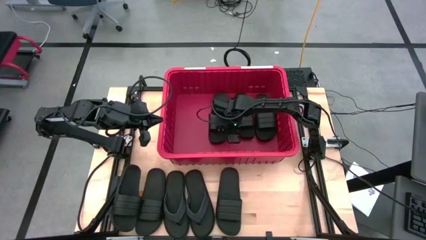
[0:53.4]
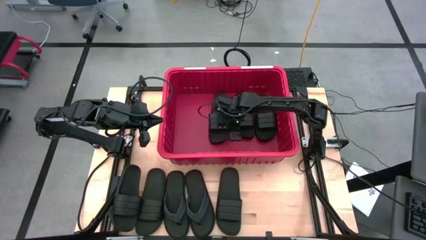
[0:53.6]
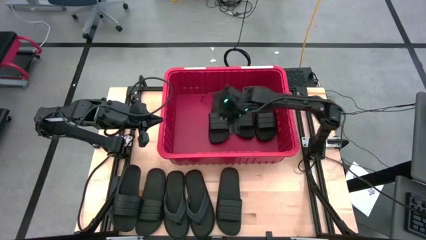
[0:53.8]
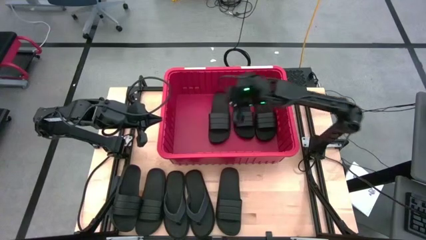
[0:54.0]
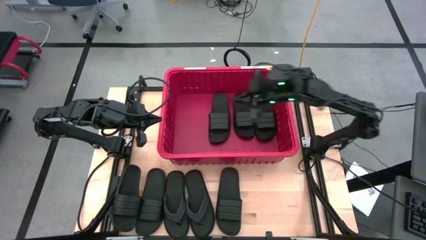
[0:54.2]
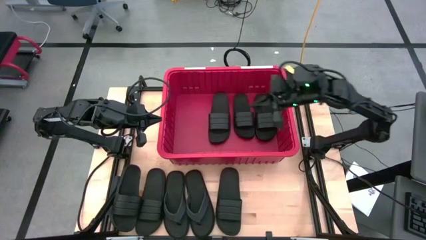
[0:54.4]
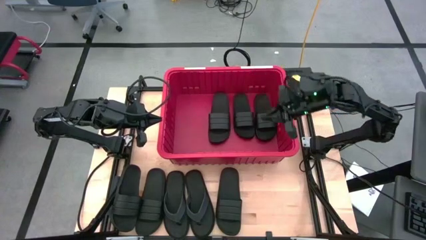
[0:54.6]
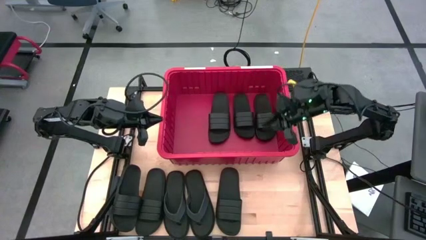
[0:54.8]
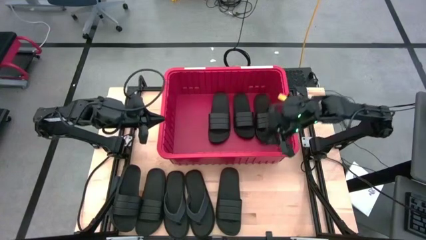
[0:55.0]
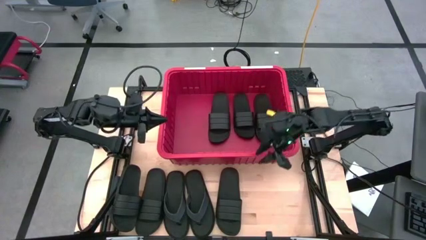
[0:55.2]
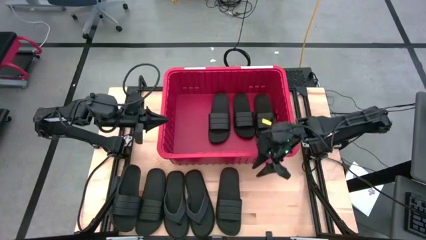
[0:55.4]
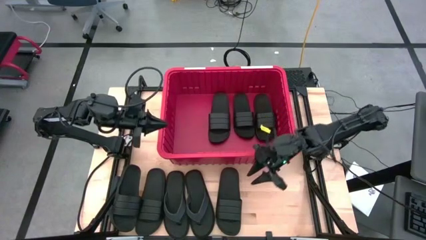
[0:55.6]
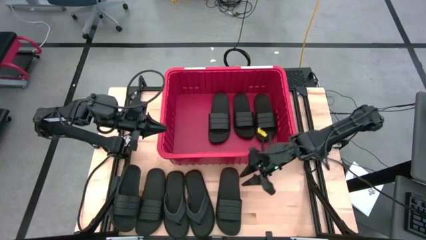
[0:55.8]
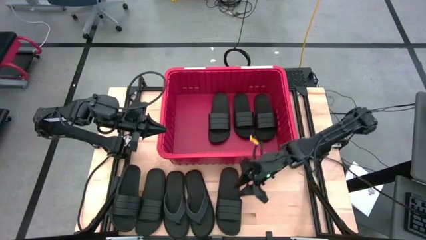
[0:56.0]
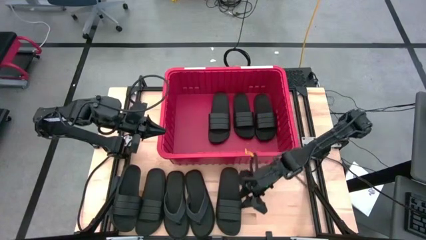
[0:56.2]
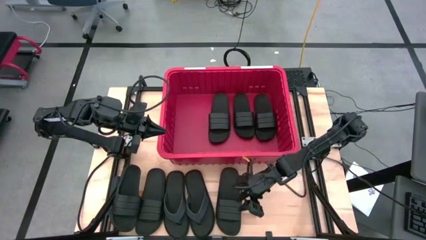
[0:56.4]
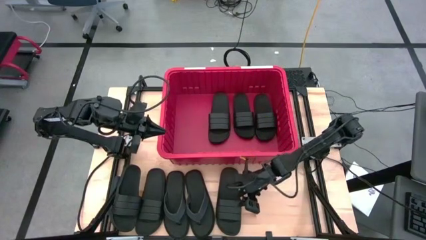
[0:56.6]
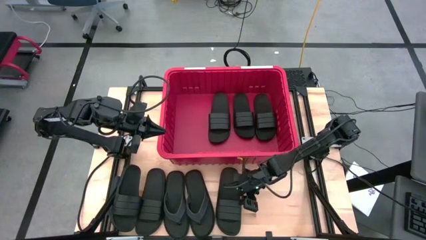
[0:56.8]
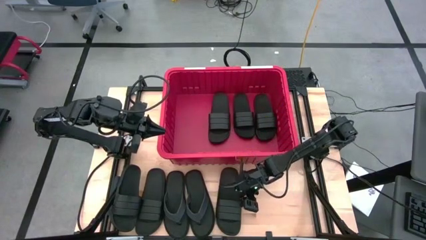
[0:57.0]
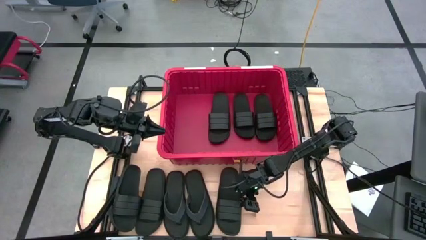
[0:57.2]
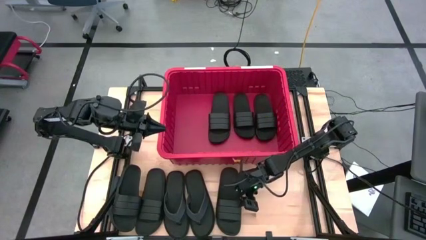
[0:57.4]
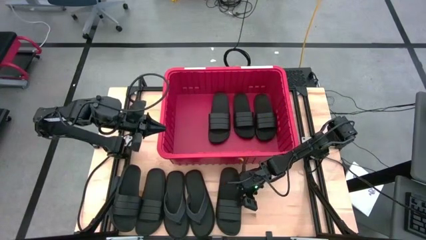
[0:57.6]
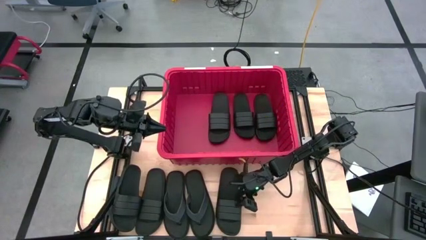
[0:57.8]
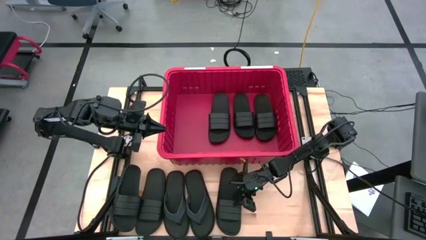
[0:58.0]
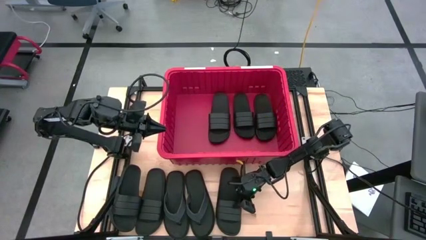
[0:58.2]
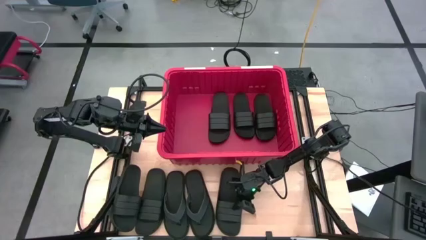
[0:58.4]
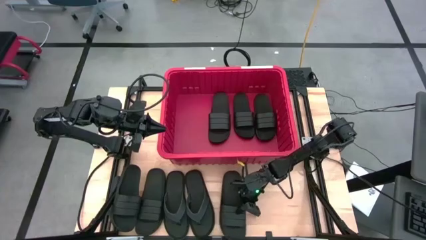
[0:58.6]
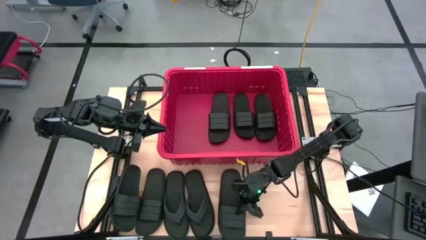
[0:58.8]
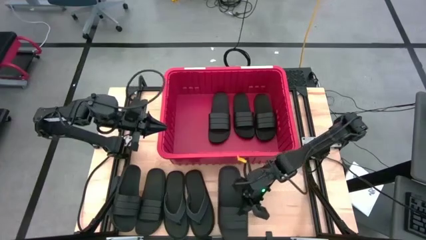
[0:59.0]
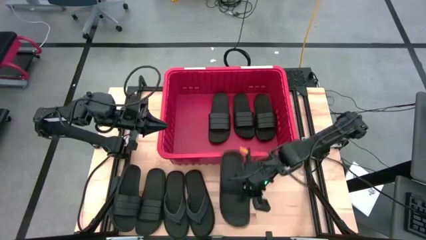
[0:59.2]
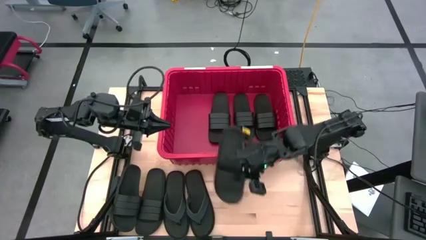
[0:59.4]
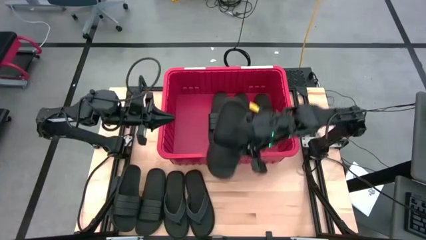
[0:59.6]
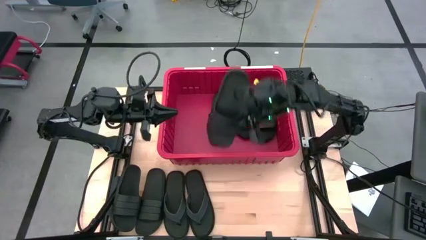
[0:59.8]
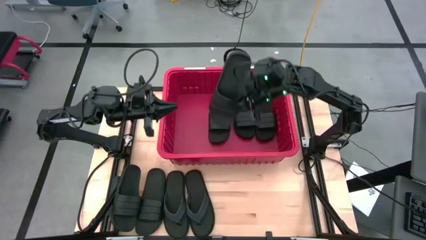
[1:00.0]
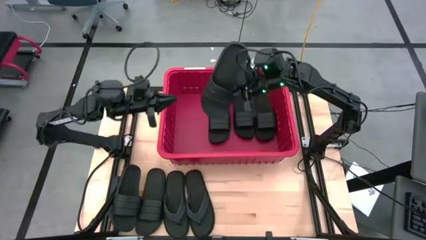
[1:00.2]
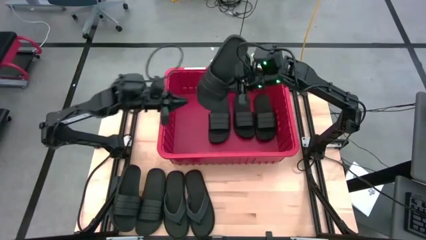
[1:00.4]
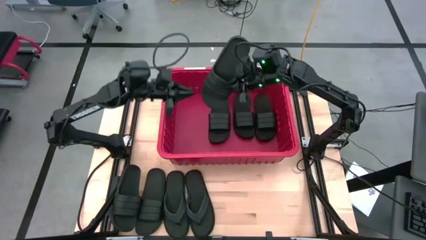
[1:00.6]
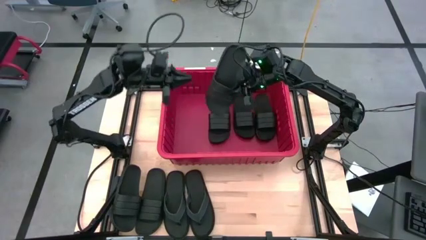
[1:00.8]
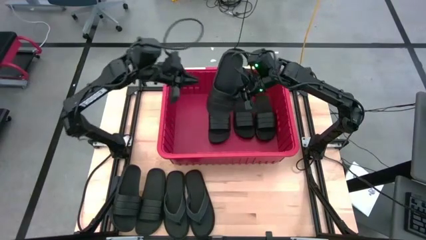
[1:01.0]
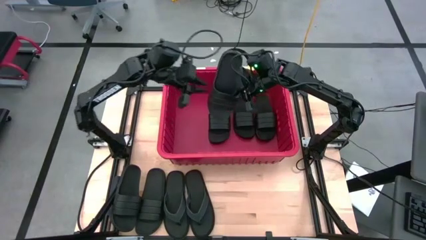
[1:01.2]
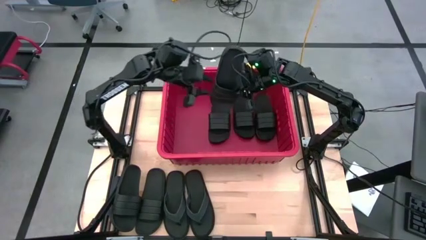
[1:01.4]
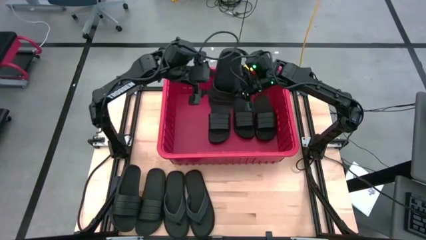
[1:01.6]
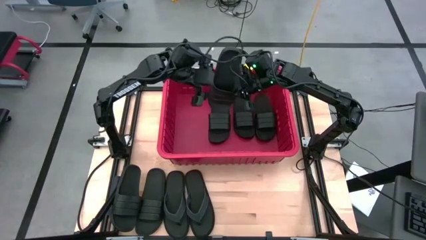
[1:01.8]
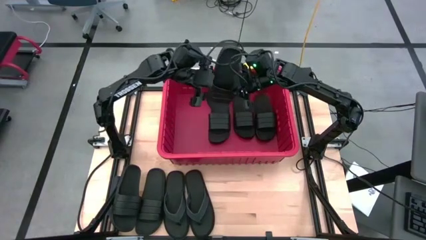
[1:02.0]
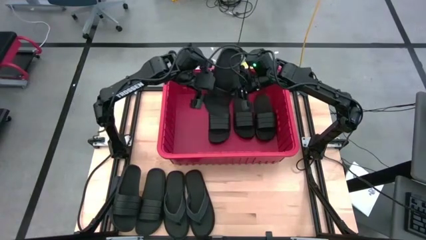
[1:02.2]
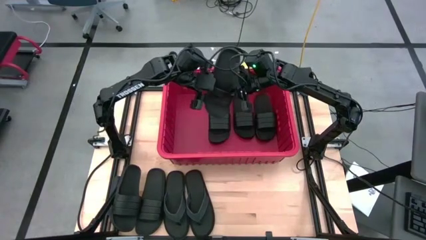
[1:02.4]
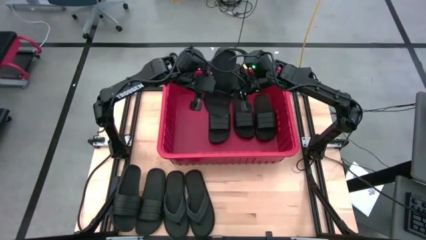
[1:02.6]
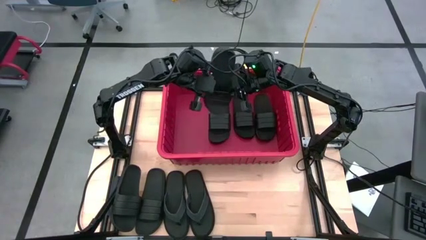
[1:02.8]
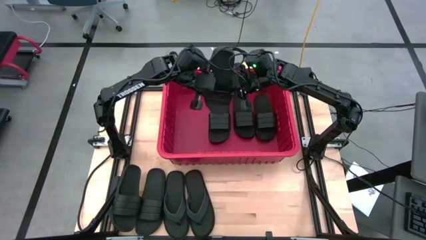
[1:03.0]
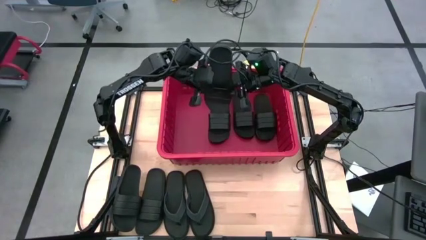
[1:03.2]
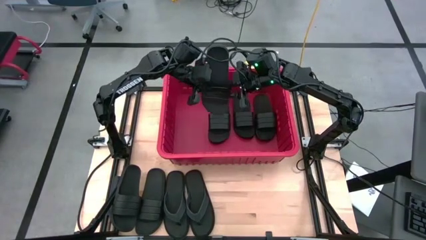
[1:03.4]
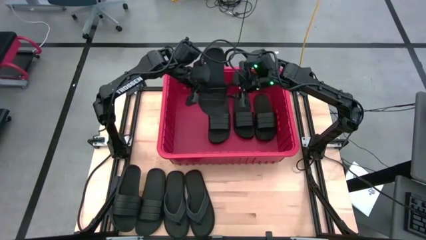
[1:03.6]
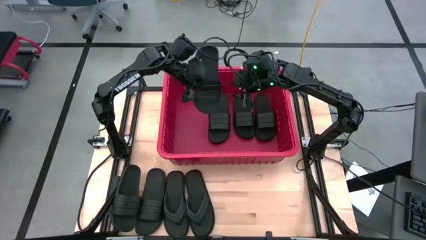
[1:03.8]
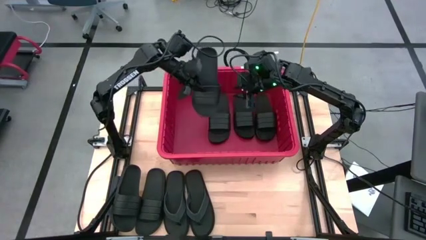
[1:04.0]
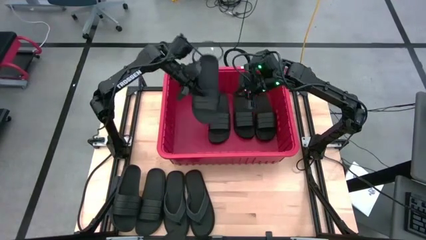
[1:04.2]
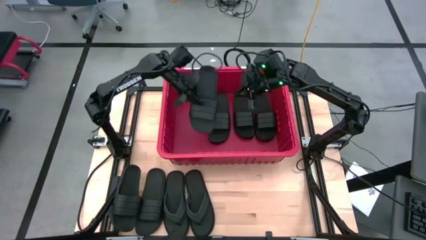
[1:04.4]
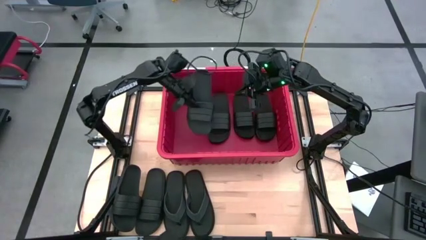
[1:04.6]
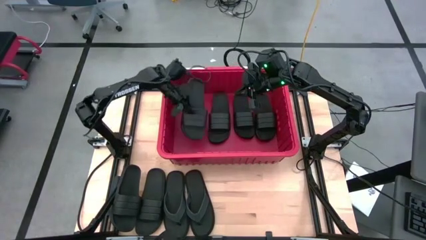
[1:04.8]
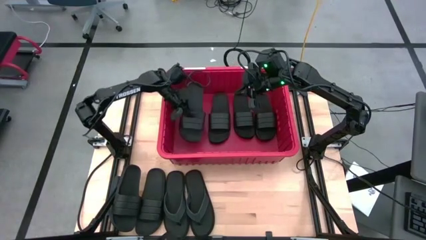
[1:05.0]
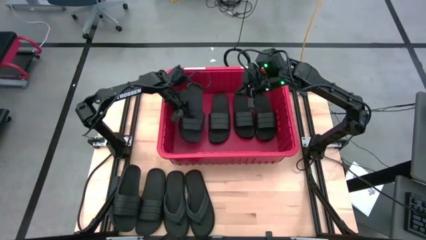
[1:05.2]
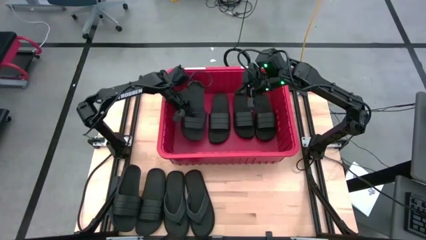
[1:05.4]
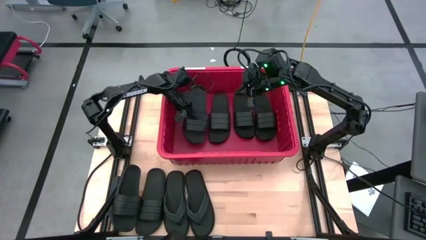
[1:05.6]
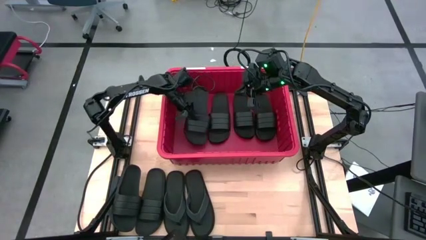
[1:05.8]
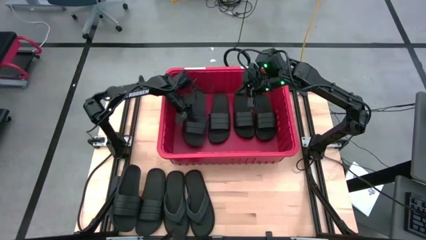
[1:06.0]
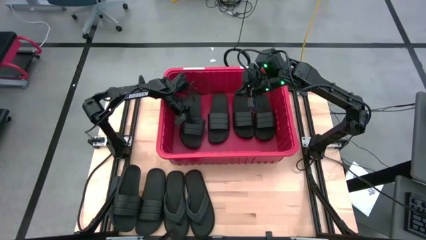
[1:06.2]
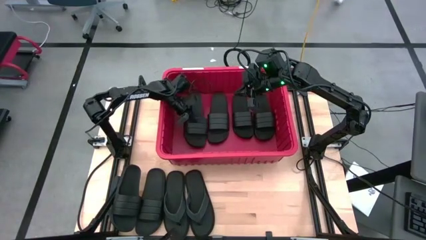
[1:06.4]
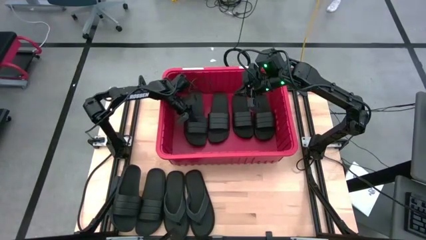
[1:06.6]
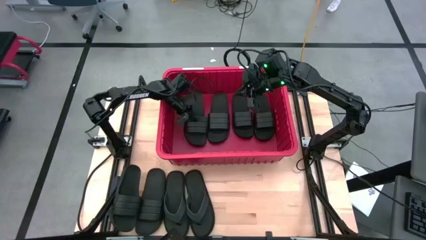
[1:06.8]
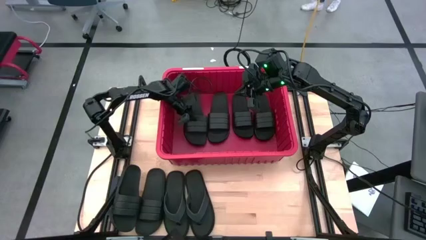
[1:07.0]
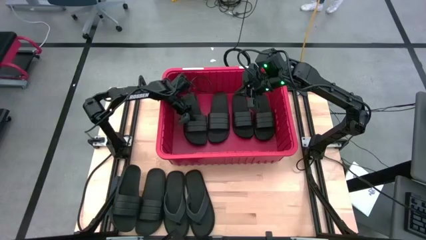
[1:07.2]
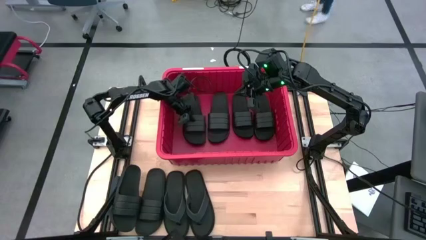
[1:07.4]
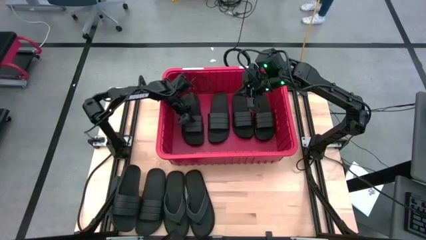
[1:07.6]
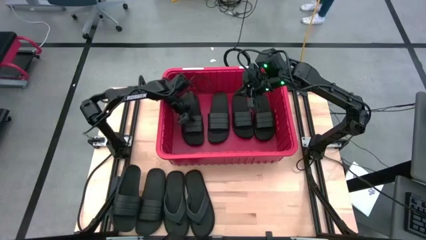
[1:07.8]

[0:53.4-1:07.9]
Task: Pick and place slides into bin
Put the black slipper into the red bin

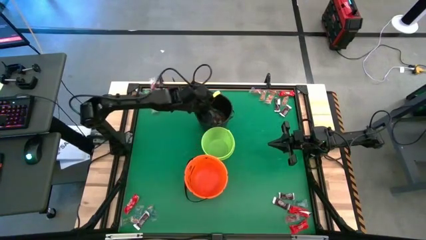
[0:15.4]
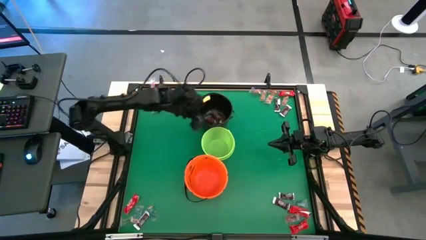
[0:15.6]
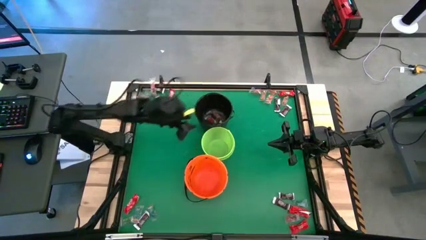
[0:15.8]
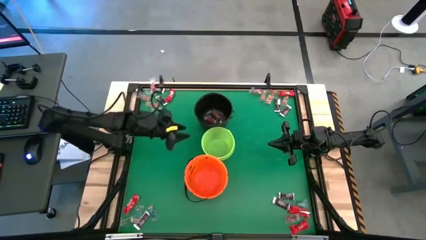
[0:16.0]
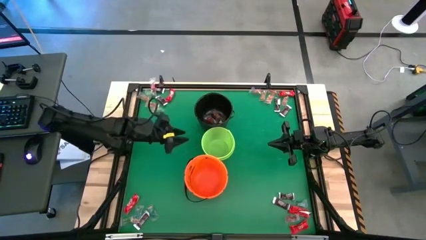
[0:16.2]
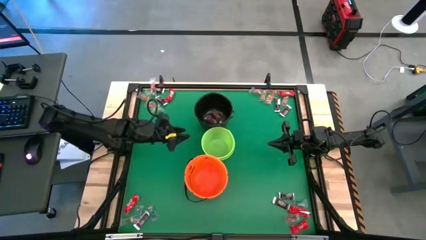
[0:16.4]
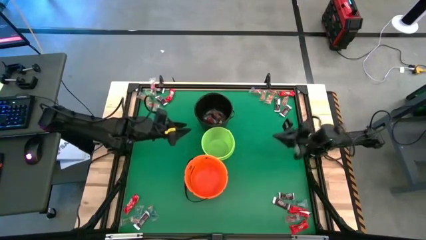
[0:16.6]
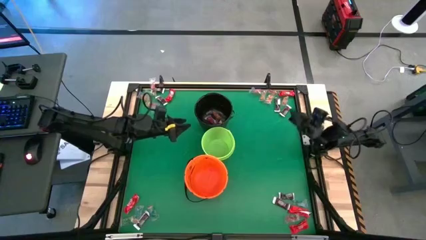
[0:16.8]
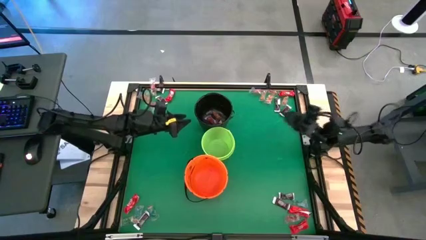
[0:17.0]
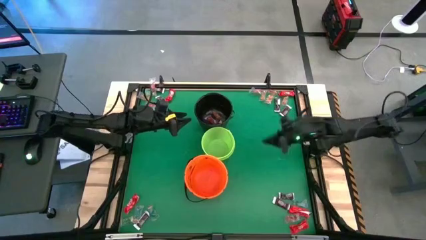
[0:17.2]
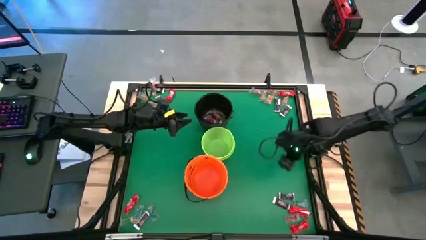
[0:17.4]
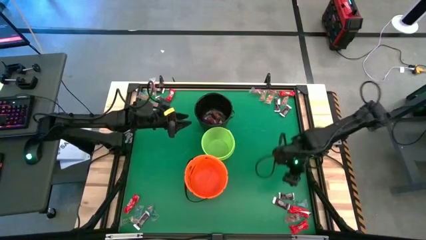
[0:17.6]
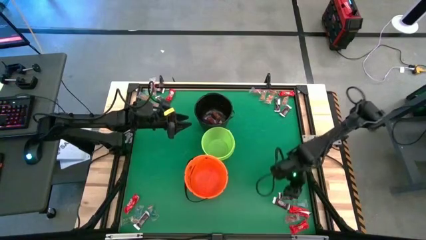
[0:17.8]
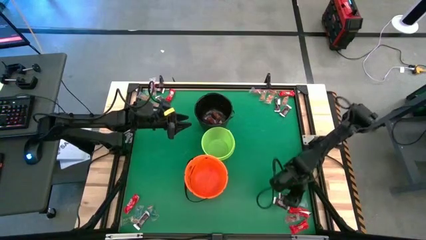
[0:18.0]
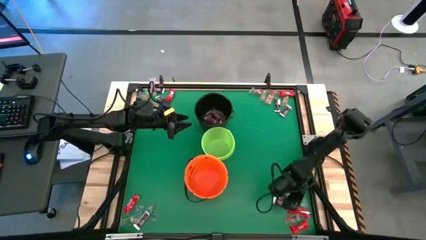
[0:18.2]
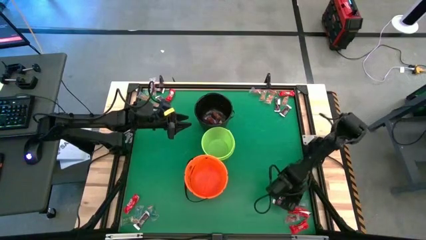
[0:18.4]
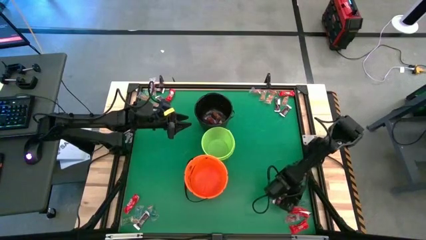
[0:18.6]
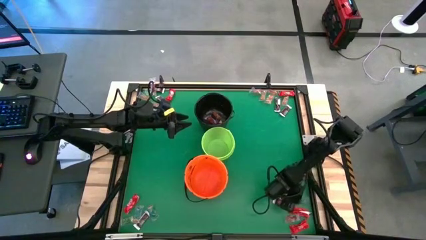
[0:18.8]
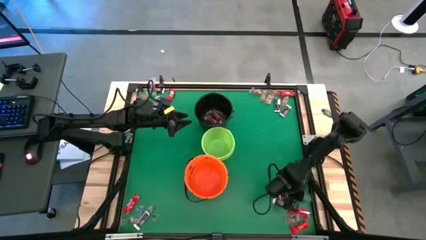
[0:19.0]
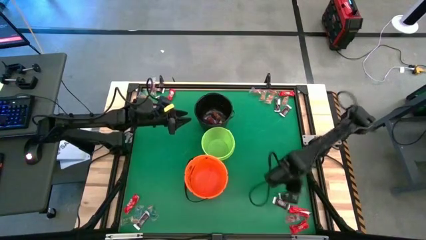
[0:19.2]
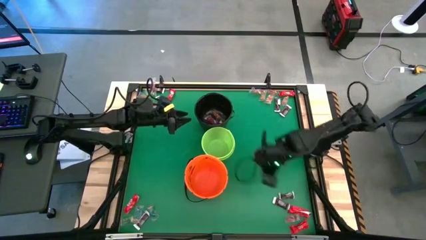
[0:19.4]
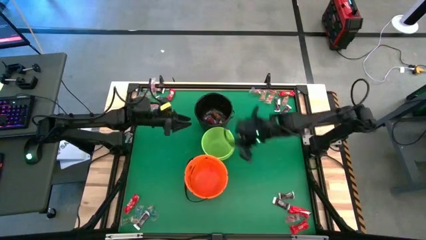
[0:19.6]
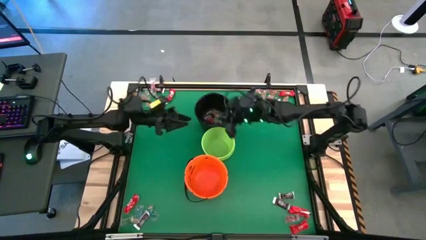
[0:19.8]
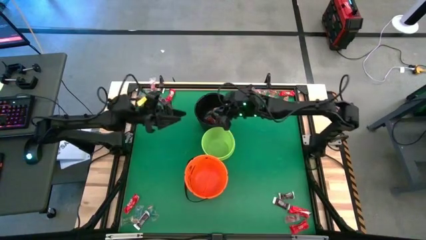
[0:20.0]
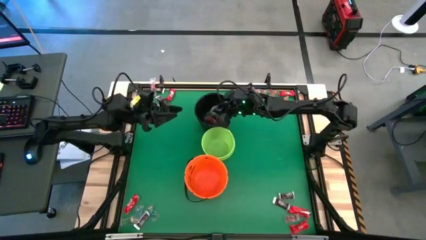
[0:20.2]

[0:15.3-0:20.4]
Task: Sort candy by brand, put in halloween buckets
Put the blue gummy into the black bucket
